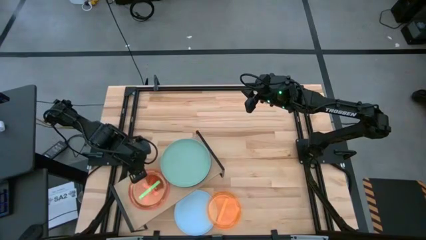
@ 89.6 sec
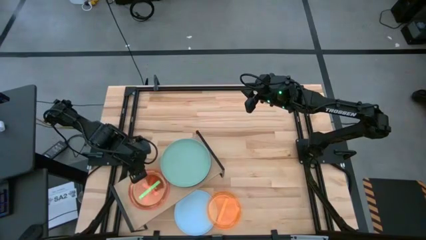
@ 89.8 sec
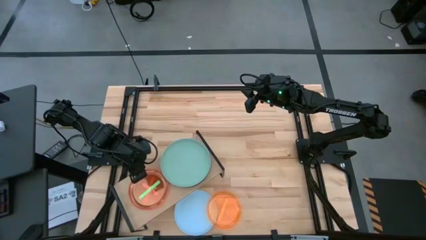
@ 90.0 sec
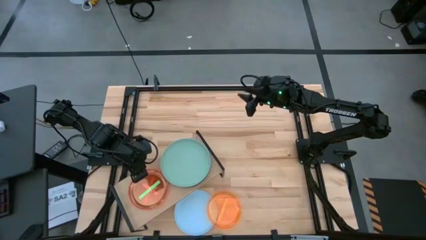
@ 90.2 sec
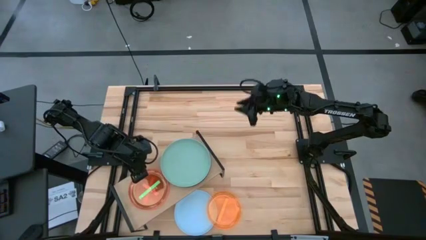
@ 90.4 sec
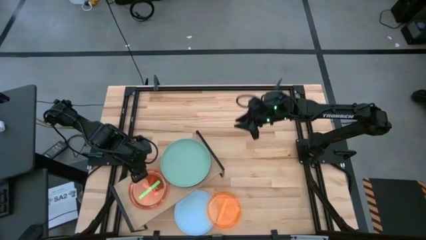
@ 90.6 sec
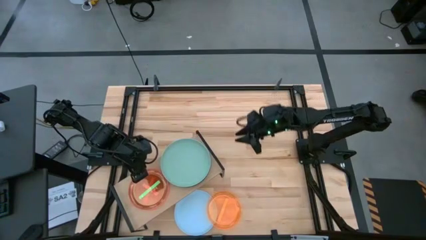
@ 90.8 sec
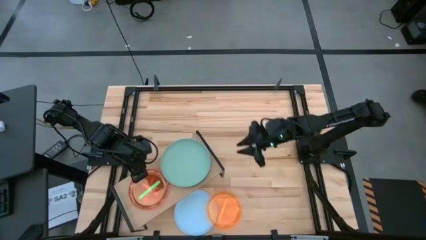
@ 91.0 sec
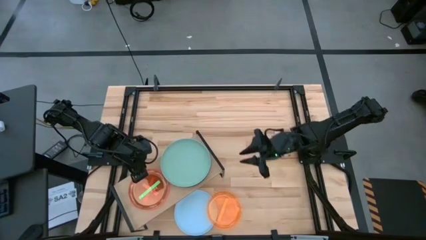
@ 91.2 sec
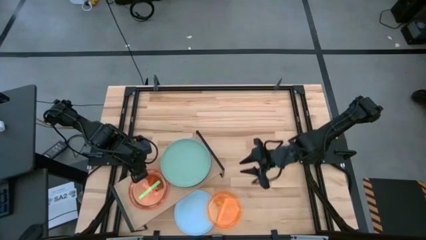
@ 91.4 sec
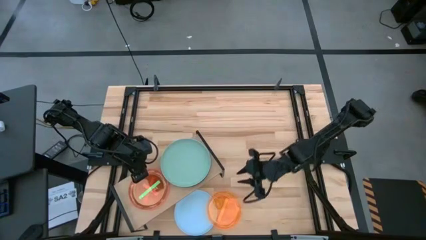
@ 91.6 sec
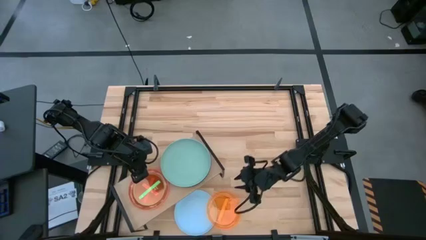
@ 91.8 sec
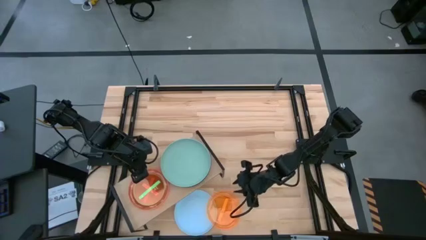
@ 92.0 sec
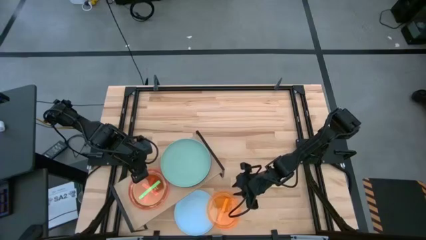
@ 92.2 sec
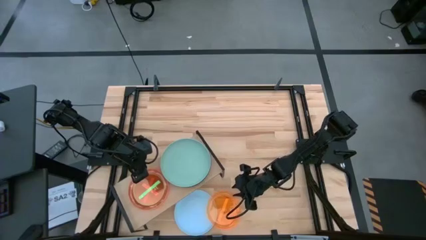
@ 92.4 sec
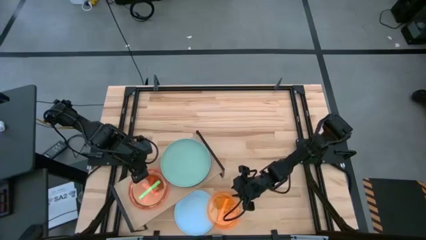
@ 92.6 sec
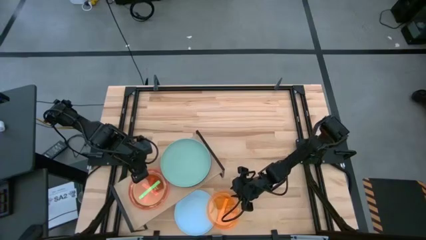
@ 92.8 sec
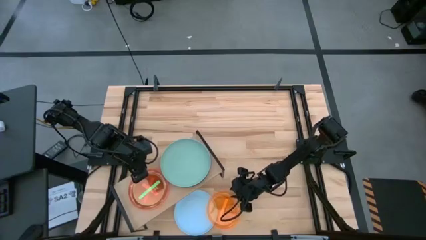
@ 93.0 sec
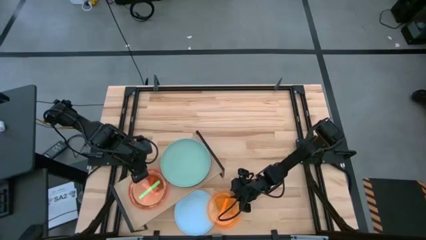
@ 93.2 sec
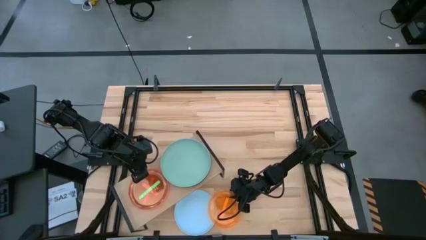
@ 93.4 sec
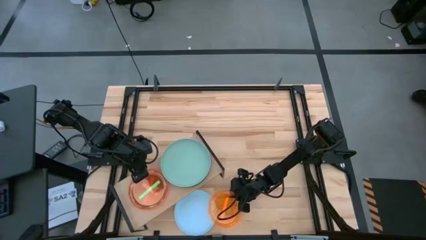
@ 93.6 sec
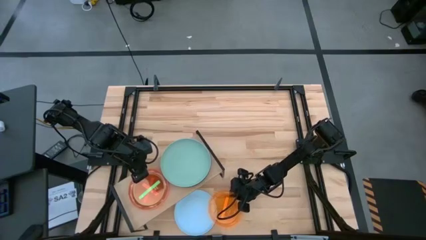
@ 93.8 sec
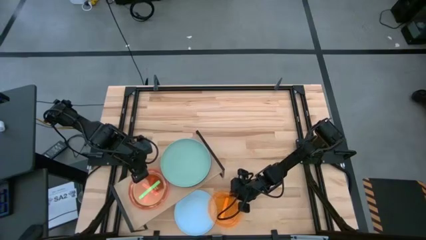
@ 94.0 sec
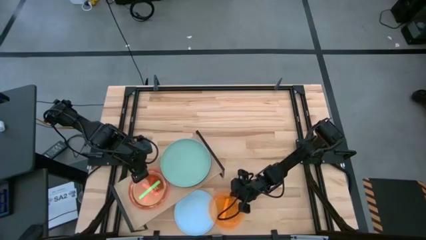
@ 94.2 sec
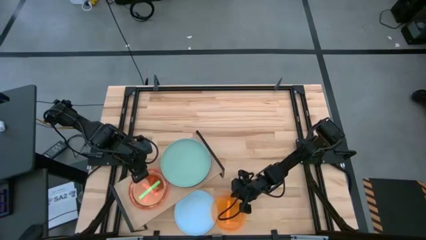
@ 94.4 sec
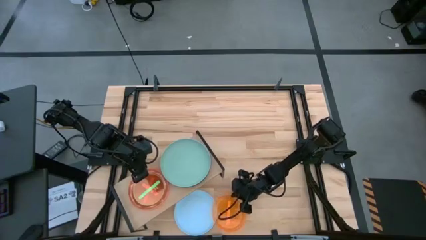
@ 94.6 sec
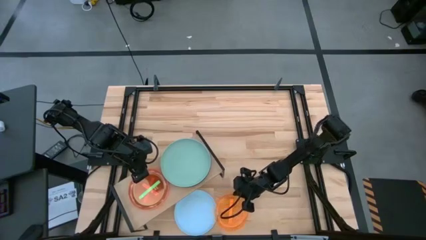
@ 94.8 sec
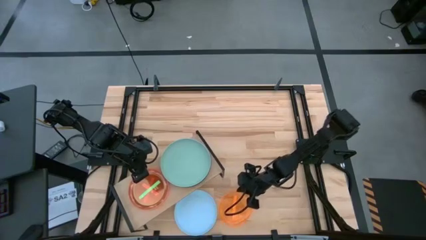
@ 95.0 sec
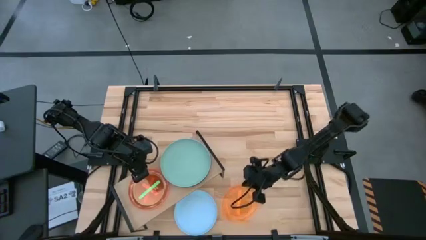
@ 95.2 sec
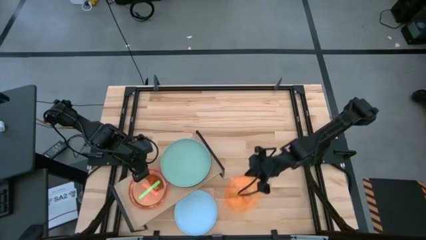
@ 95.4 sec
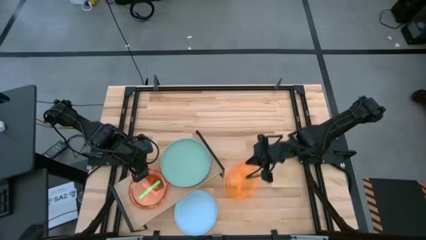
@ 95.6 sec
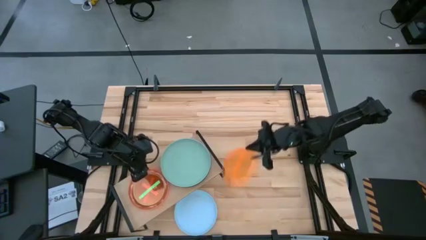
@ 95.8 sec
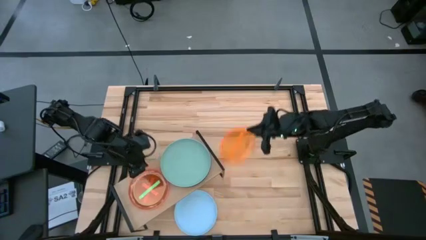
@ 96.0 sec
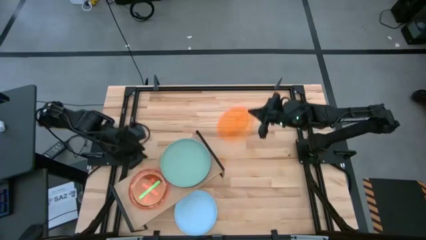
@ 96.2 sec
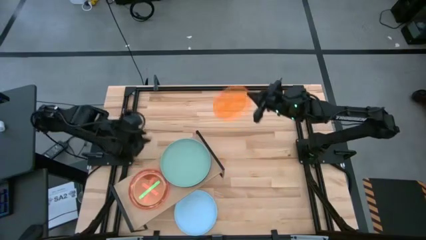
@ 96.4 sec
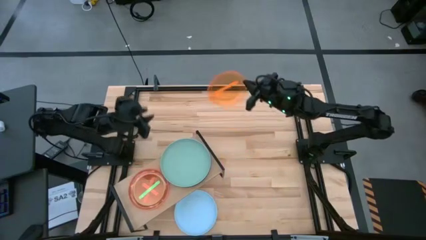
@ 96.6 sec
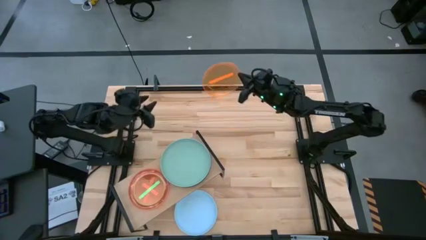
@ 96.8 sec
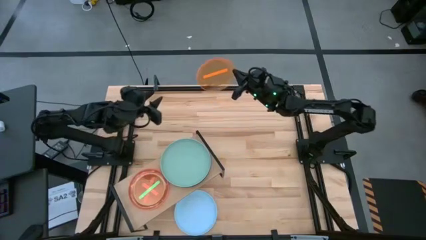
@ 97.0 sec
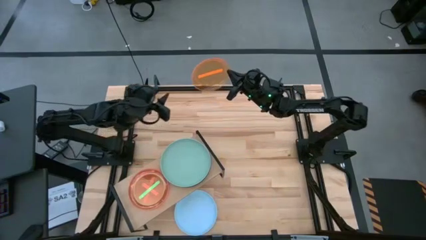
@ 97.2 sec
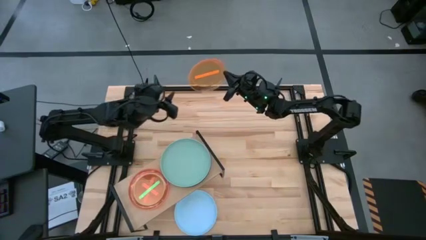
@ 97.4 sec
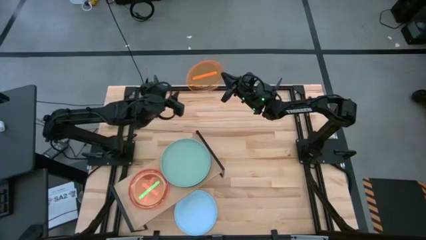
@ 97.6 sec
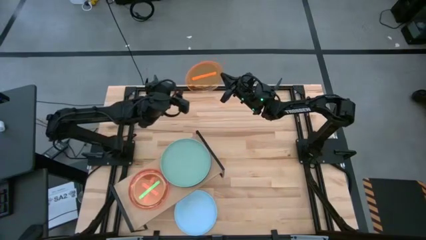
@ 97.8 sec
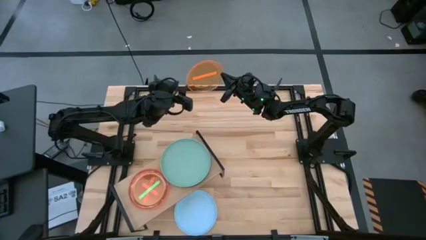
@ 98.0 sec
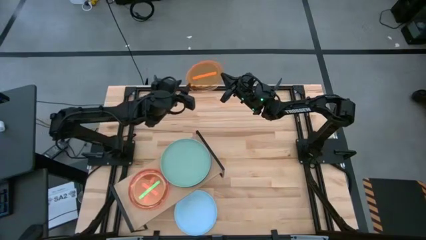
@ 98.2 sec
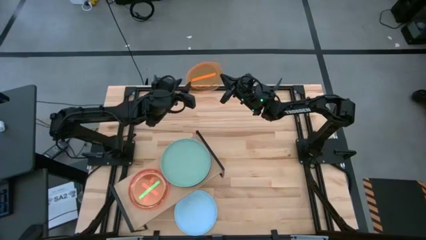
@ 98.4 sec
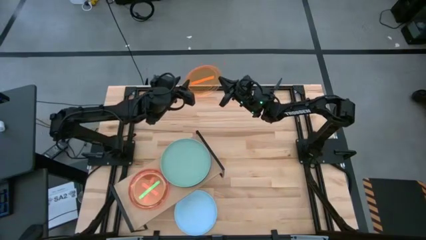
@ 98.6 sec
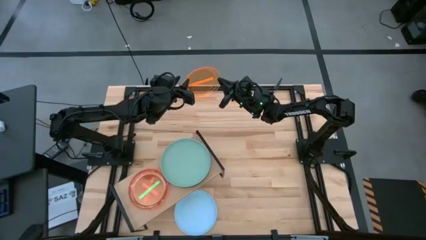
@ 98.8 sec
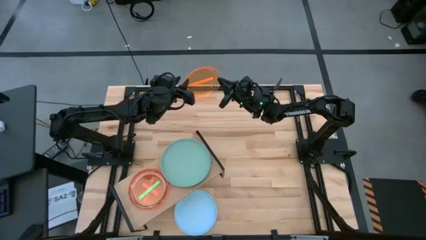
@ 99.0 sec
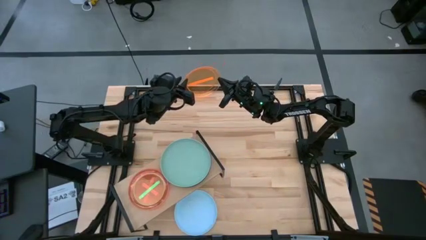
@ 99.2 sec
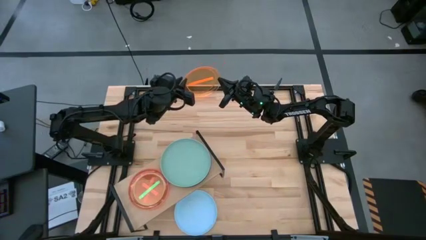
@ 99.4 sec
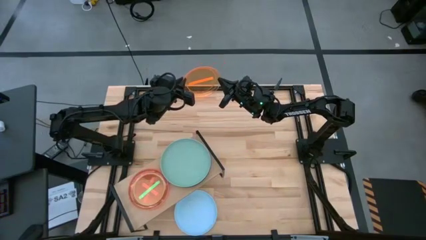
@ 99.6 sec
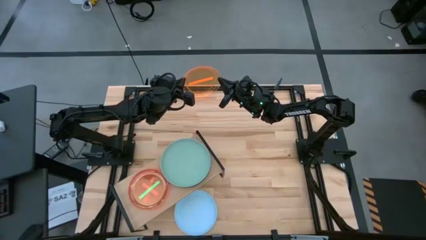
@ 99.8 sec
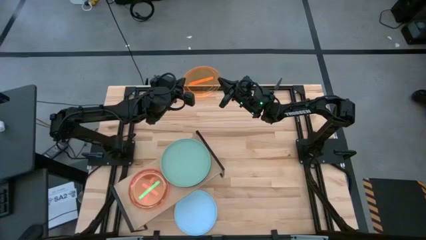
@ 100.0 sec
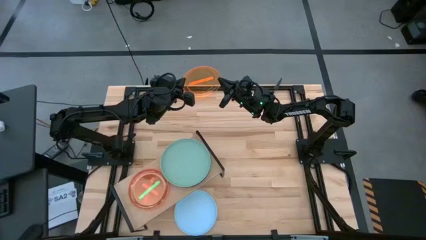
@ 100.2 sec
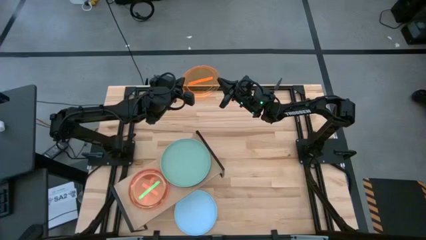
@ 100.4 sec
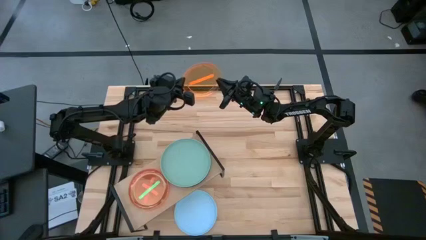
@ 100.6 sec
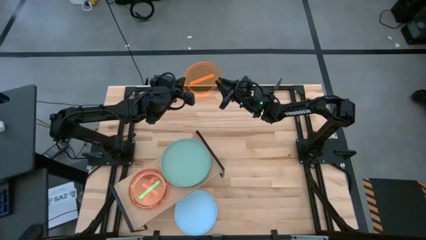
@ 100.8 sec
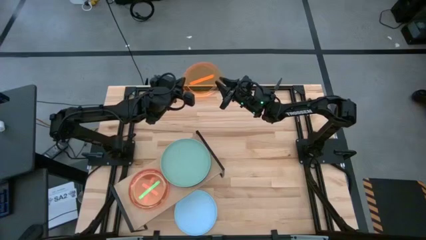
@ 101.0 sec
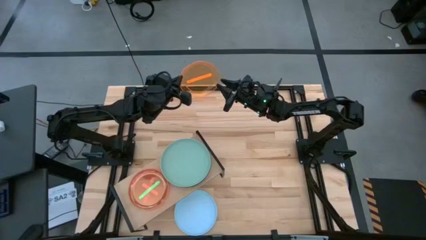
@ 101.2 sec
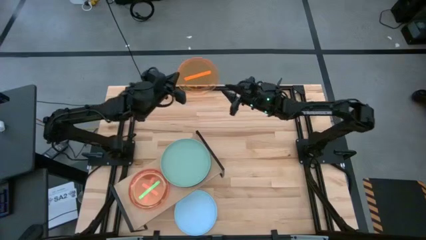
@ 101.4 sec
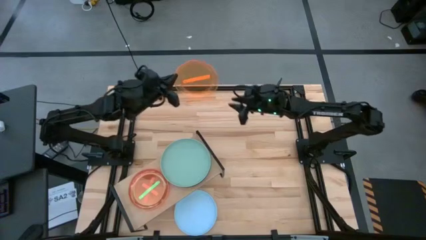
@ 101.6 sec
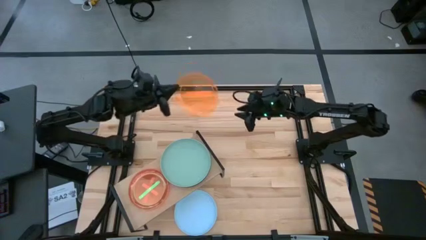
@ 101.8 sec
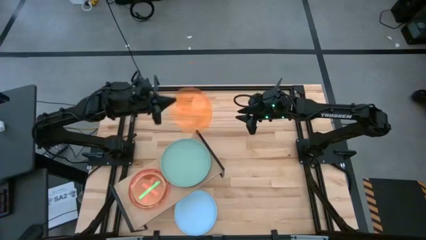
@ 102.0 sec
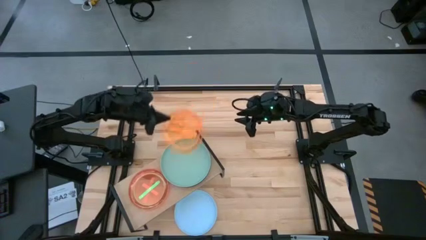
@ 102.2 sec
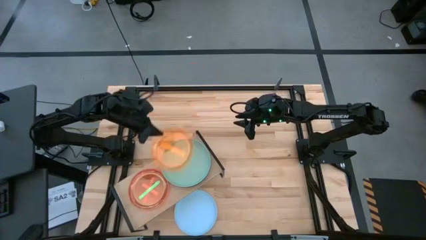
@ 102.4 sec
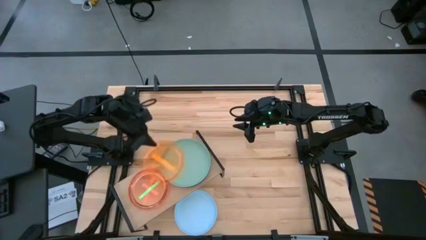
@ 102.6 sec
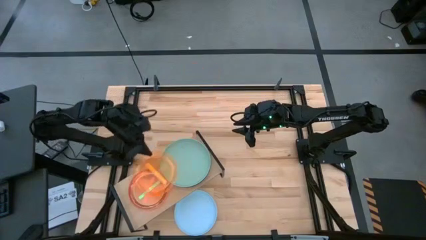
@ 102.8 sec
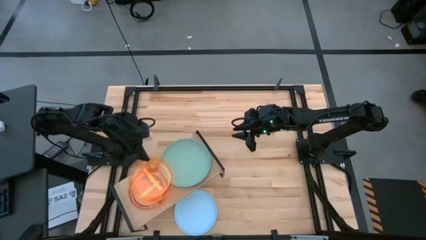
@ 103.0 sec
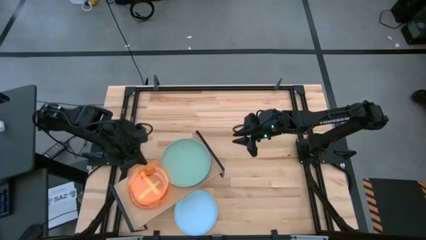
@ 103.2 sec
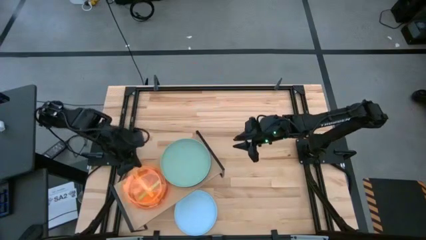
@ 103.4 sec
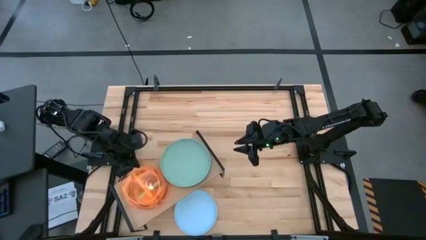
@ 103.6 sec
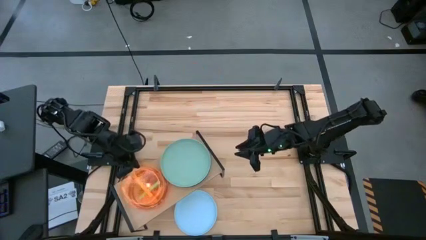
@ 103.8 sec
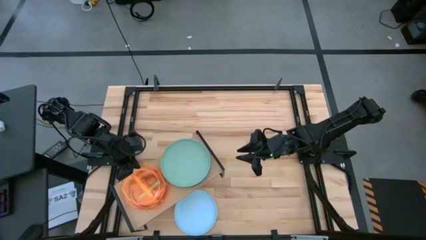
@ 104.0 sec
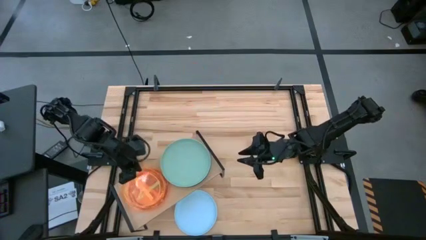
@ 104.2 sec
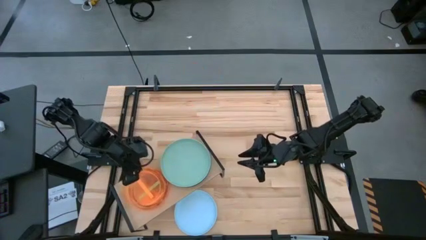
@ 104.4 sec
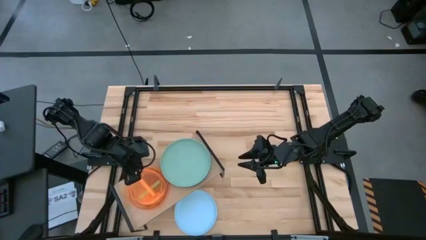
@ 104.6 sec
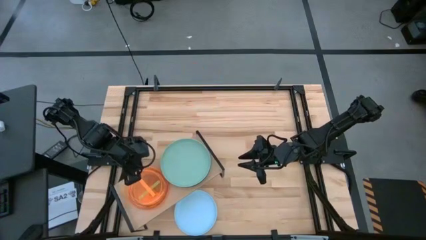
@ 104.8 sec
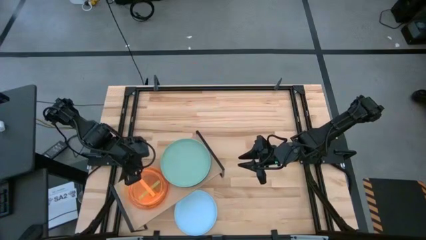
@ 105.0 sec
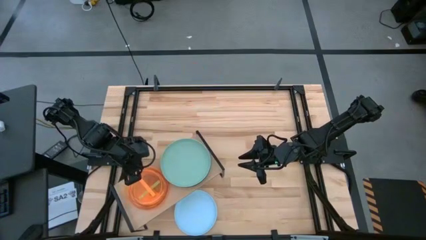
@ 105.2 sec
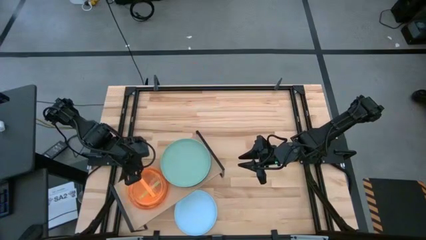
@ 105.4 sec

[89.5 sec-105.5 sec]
Task: Place and stack plates onto a shelf
Stack the orange plate on top of the green plate on the shelf
